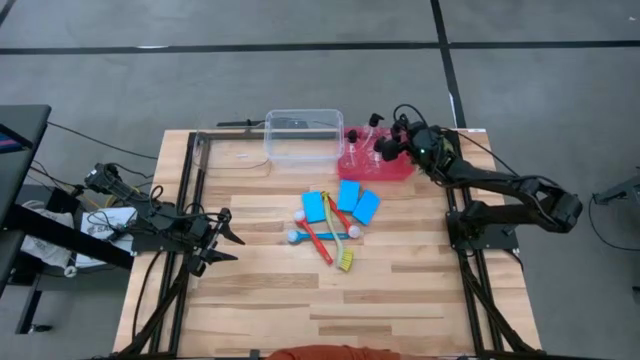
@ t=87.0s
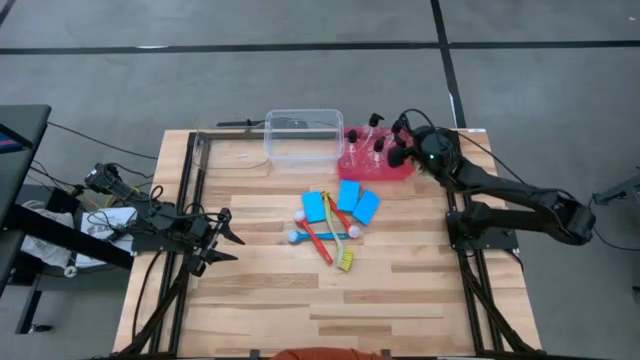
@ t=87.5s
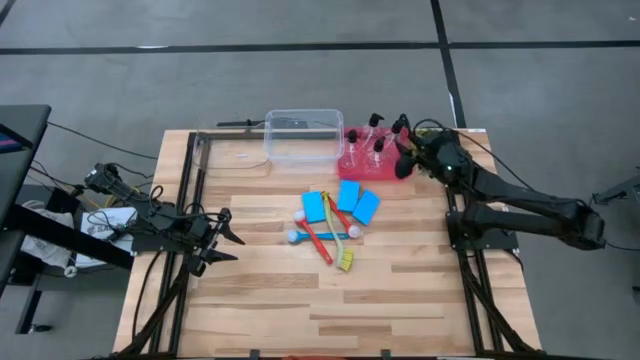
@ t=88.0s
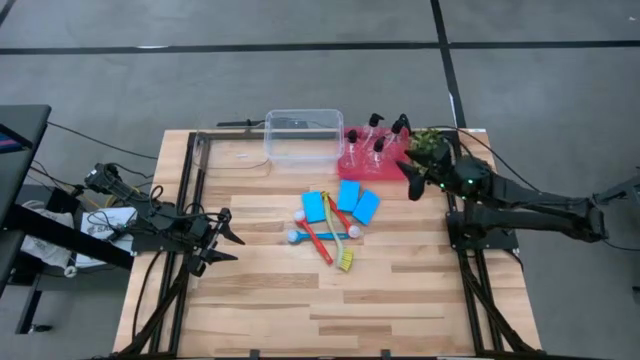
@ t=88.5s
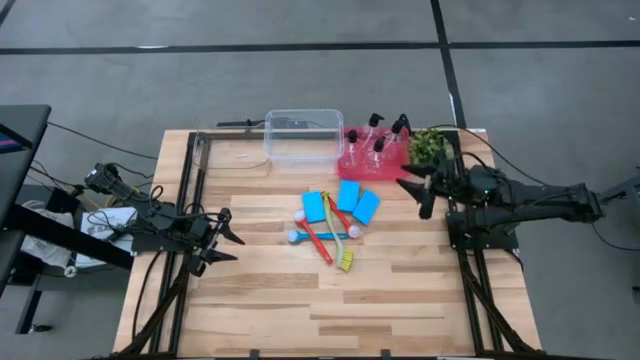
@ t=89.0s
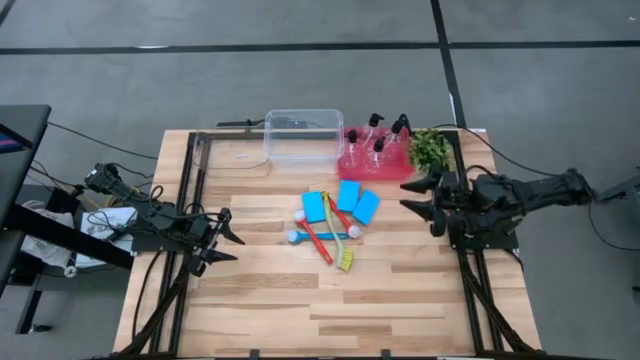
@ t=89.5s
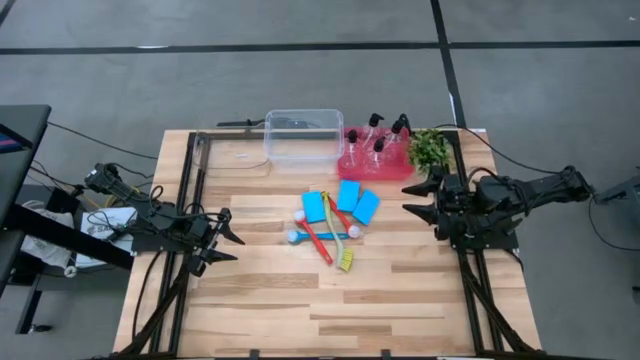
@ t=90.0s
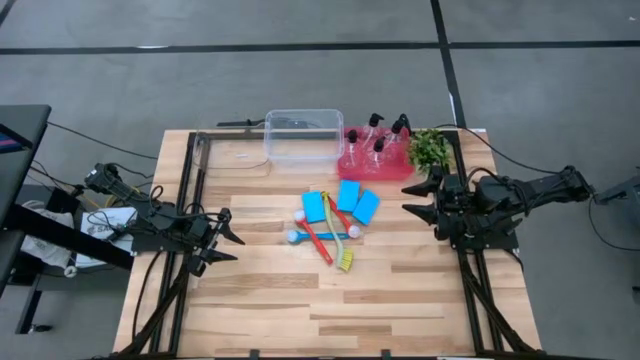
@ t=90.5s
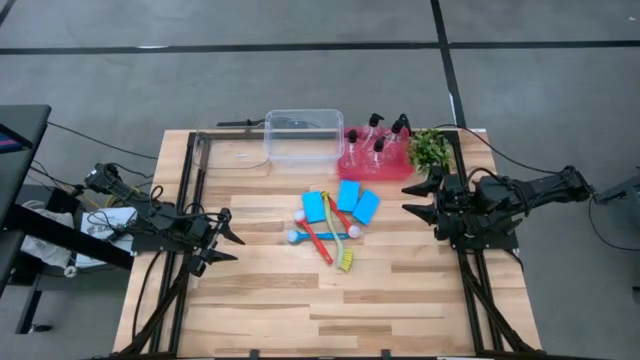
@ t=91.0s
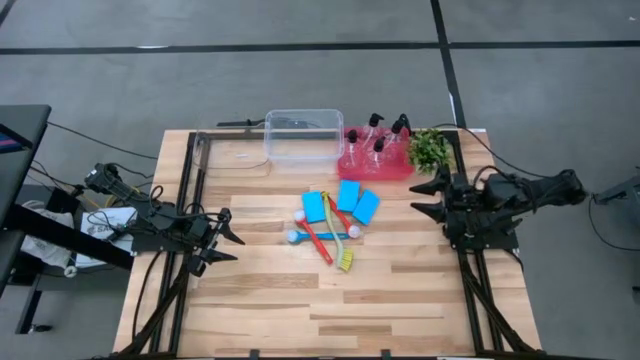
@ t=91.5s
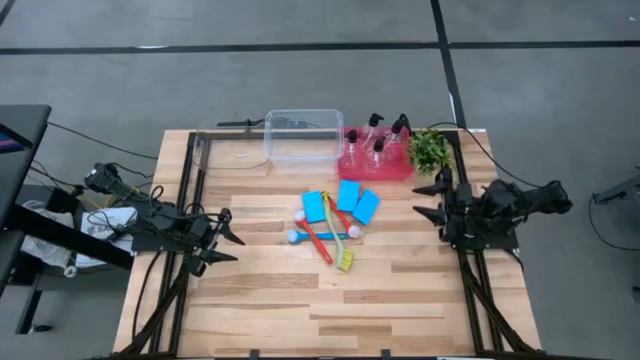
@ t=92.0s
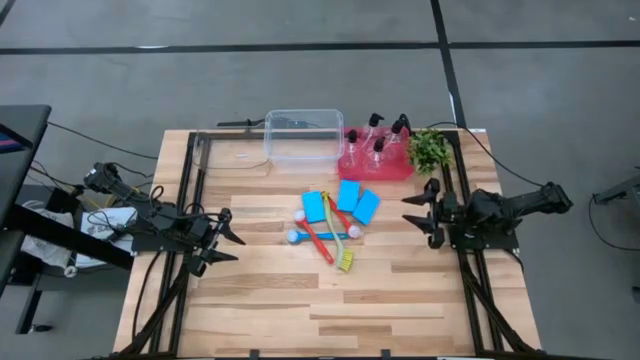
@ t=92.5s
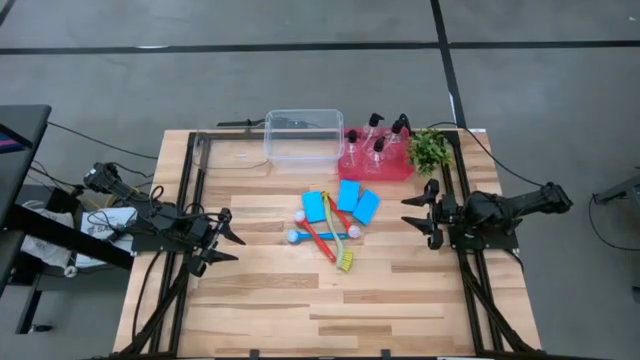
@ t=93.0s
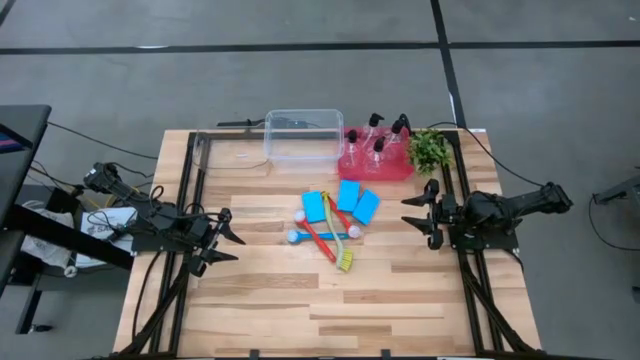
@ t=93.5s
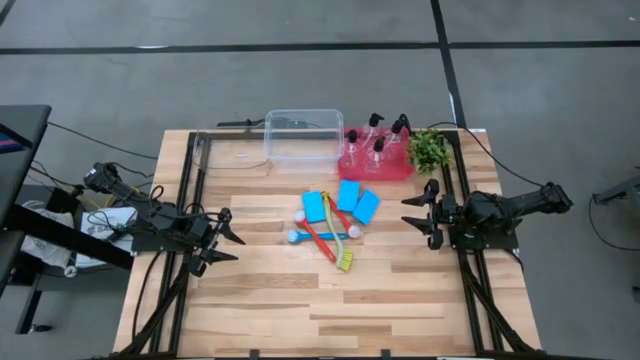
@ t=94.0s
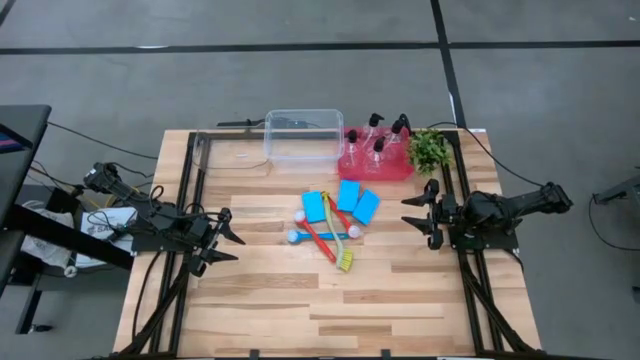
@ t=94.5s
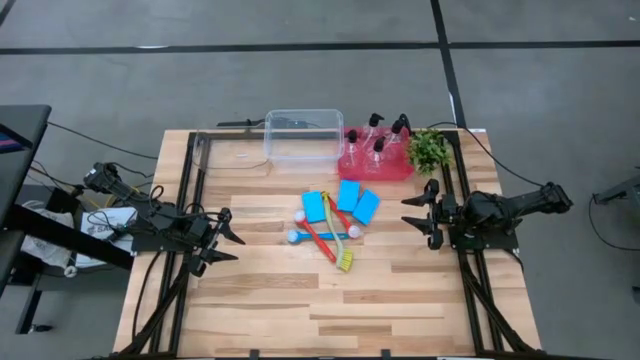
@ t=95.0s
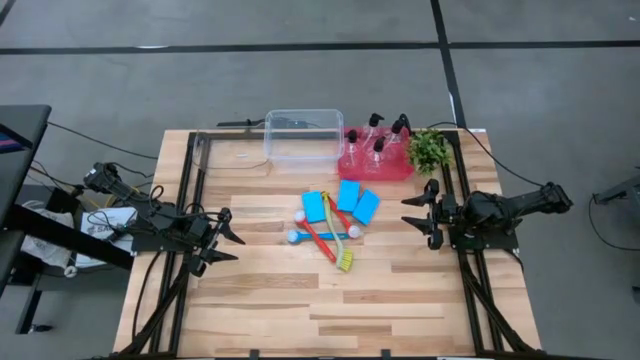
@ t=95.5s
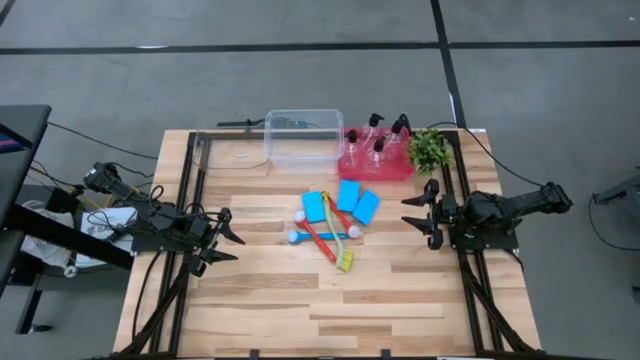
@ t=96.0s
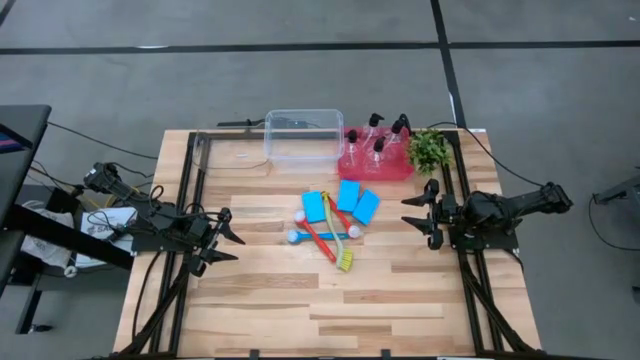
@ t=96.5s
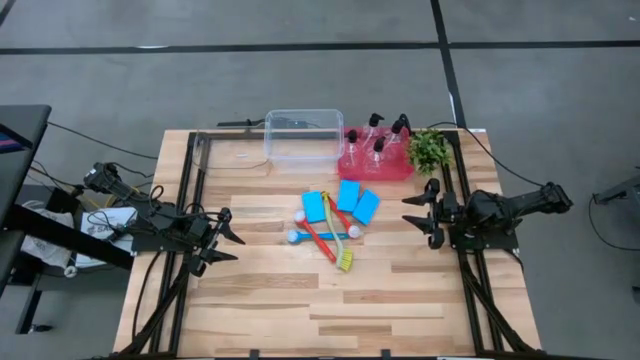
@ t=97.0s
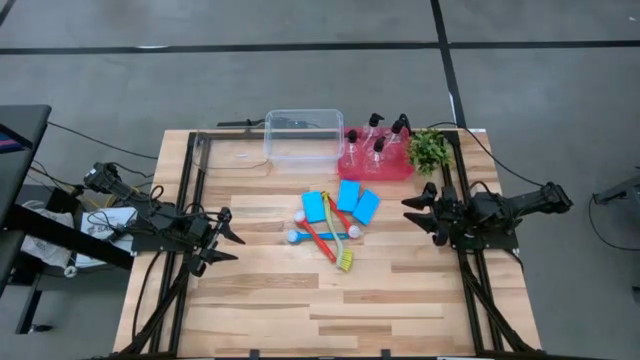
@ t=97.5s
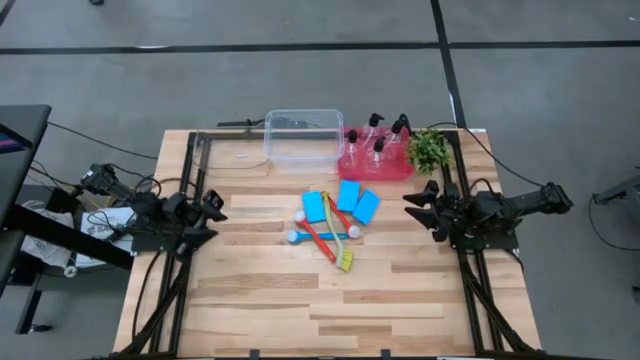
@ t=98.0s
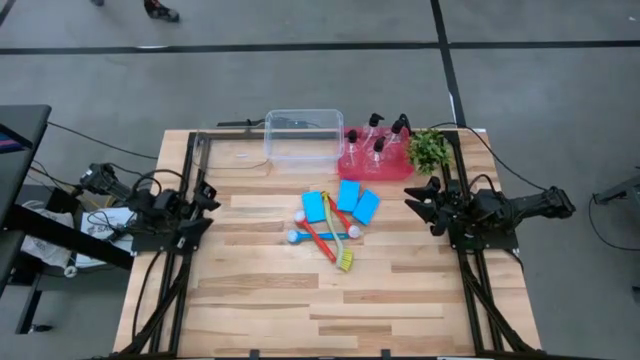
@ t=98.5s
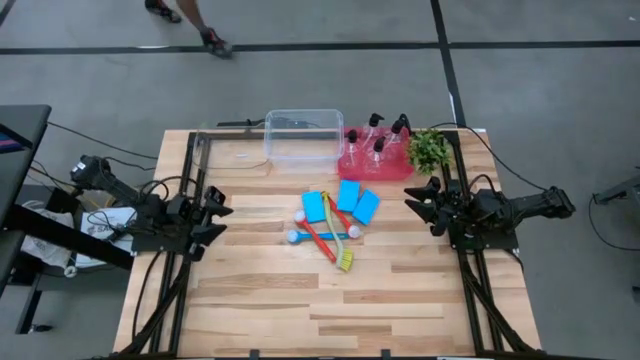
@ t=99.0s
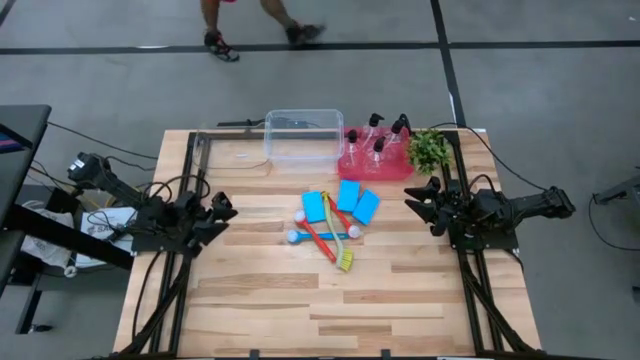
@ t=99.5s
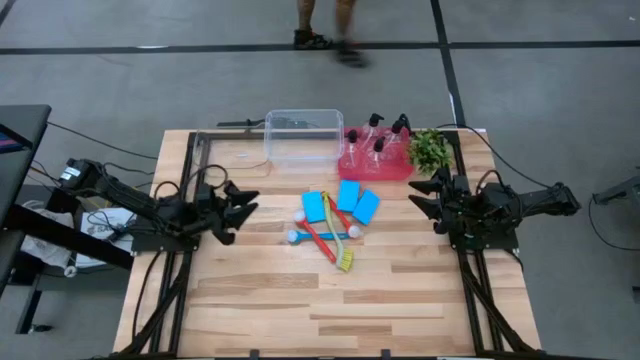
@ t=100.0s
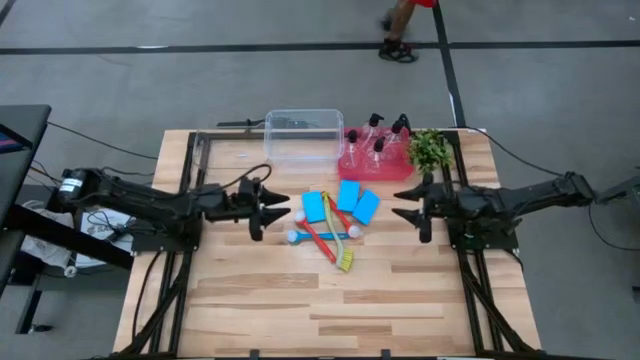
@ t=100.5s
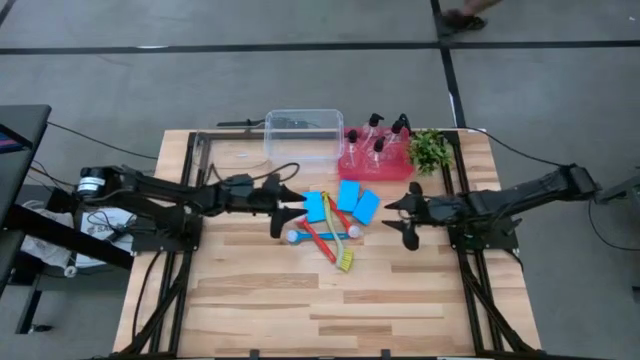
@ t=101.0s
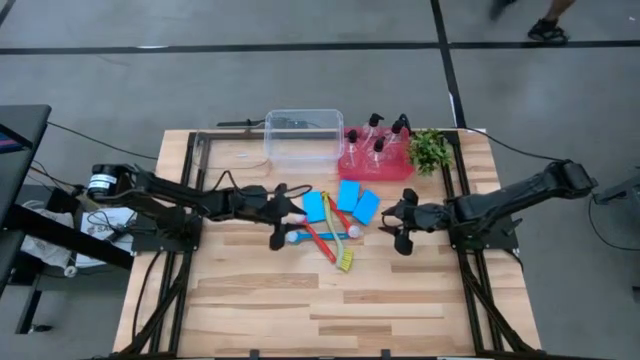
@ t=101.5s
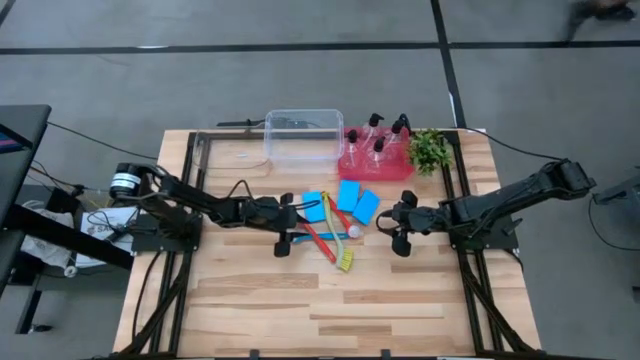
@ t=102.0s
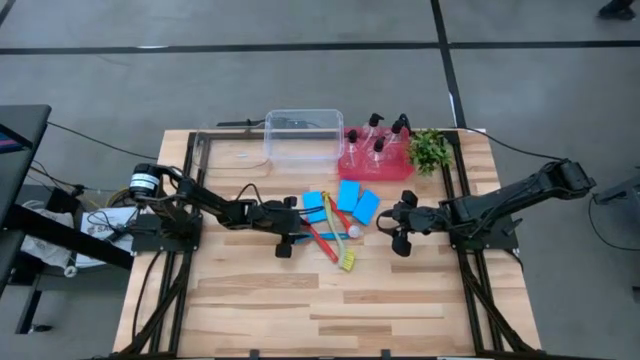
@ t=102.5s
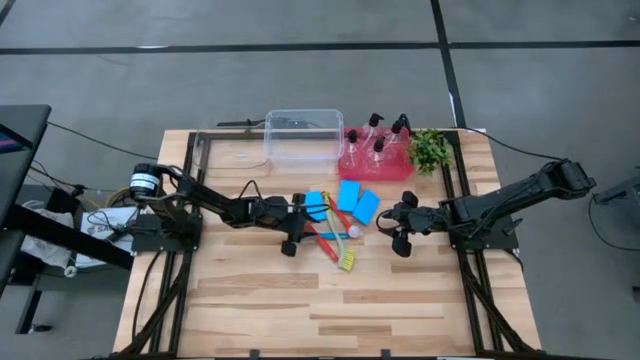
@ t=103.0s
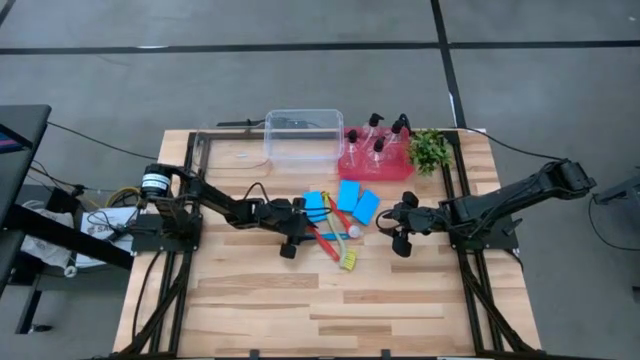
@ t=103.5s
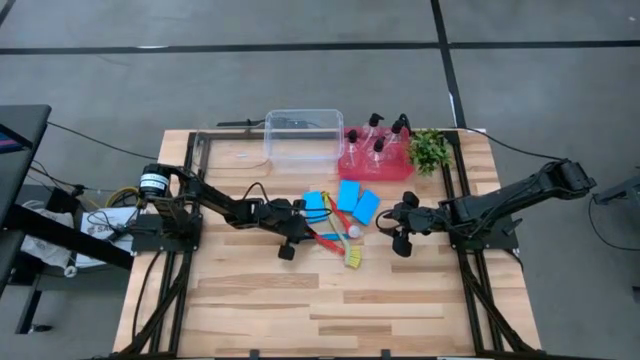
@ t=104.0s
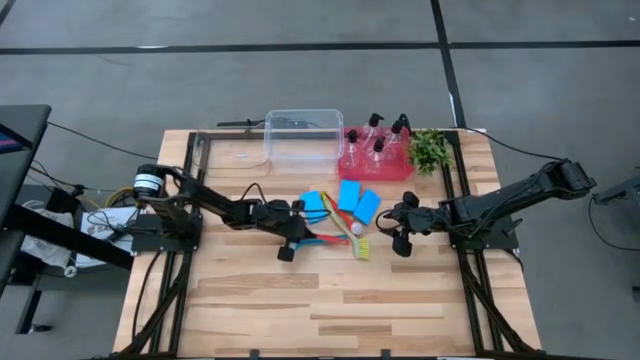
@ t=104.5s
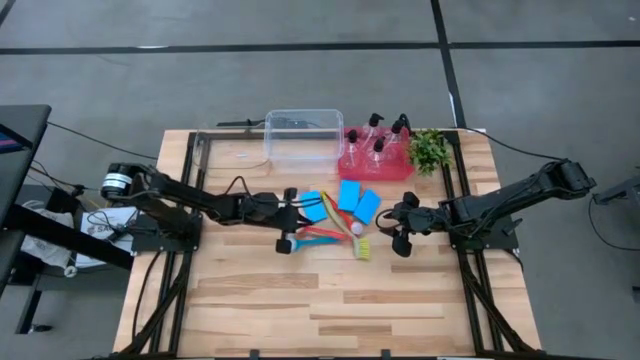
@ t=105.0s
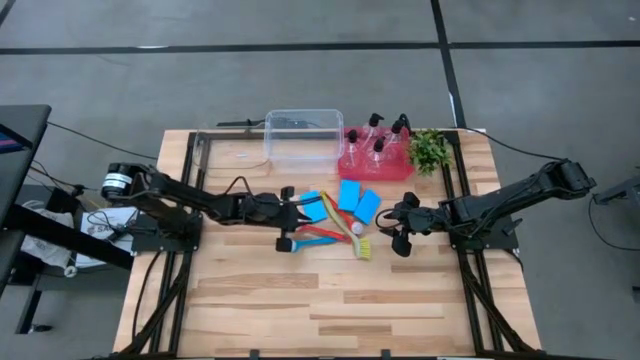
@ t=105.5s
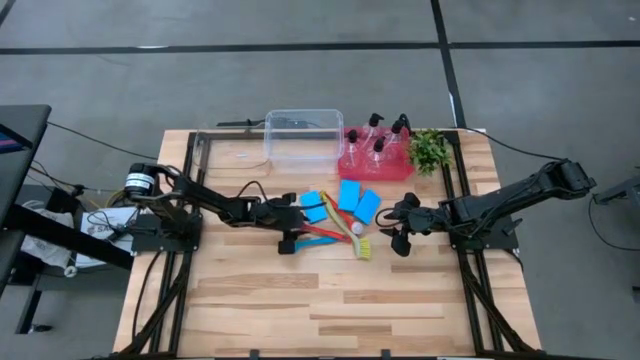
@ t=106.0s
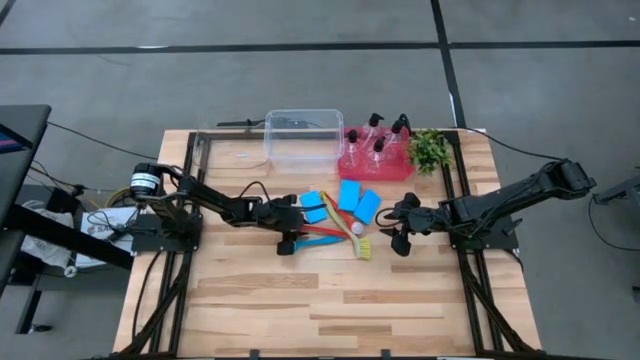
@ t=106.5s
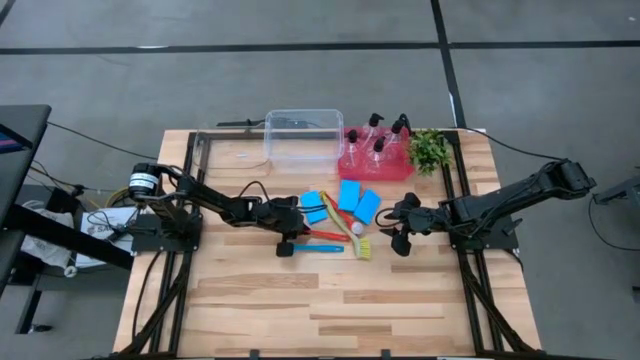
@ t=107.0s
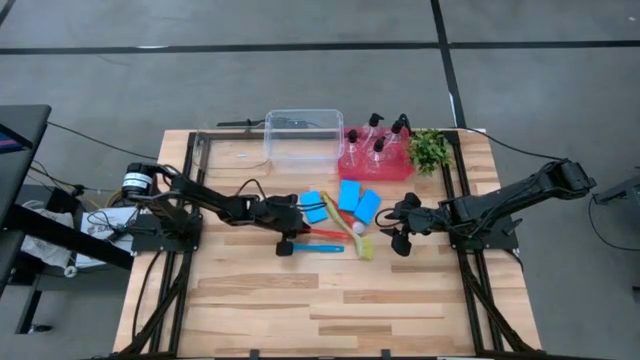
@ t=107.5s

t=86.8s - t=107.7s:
Task: Pick & Place Kitchen Sink Supplies
Put the bottom red toilet brush into the white bin
